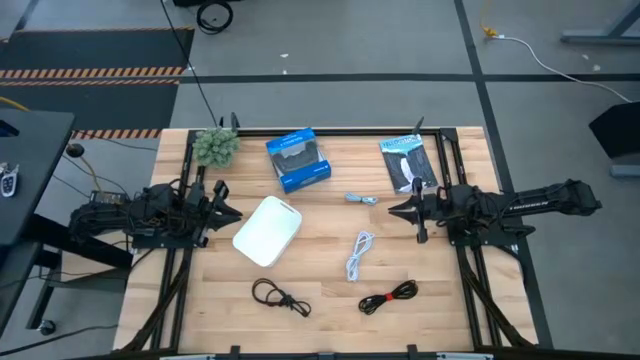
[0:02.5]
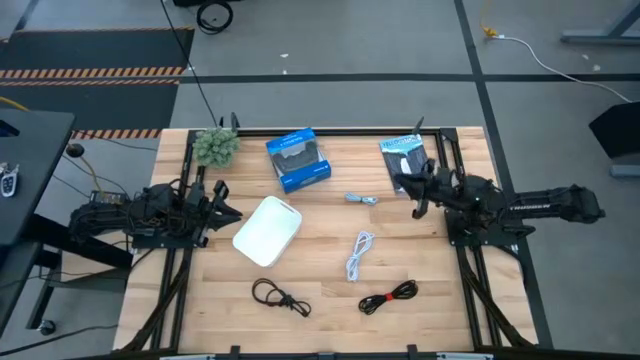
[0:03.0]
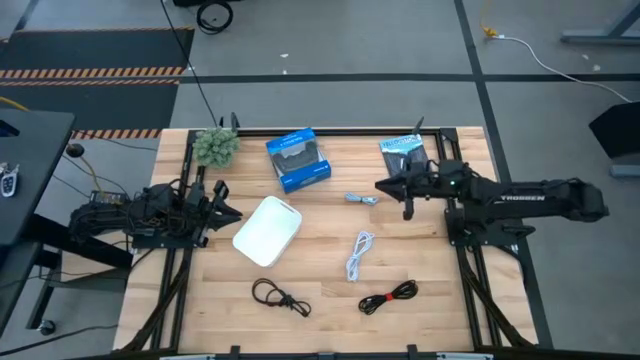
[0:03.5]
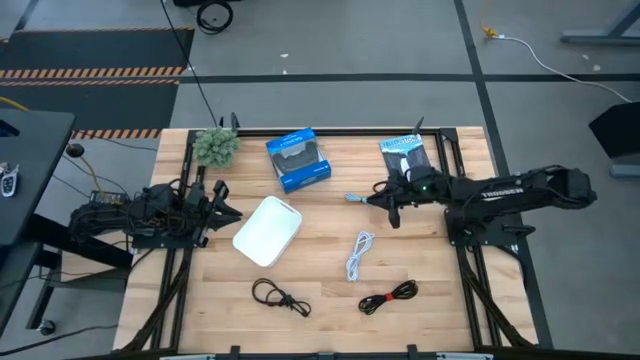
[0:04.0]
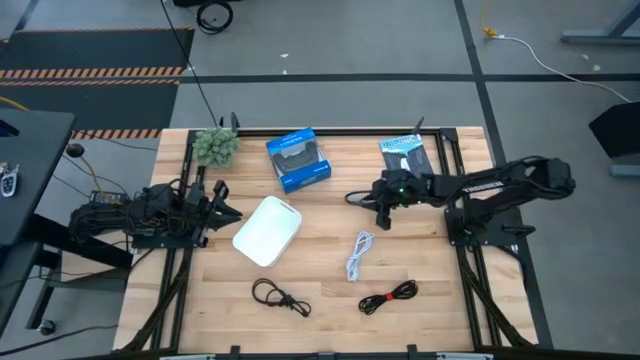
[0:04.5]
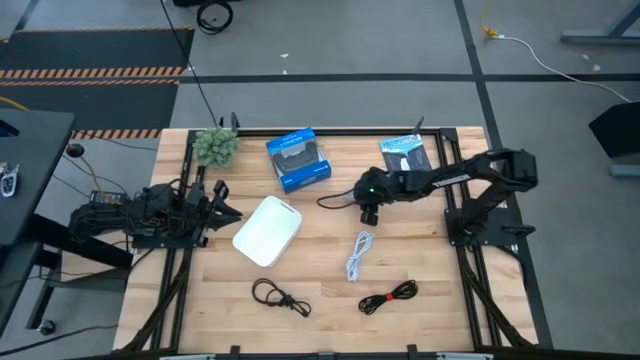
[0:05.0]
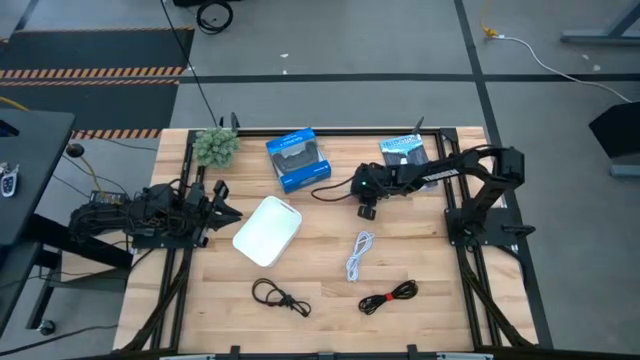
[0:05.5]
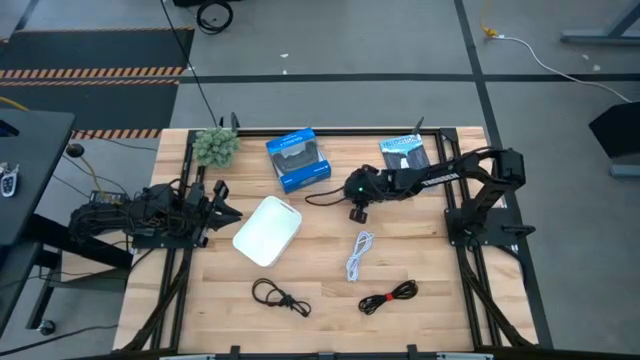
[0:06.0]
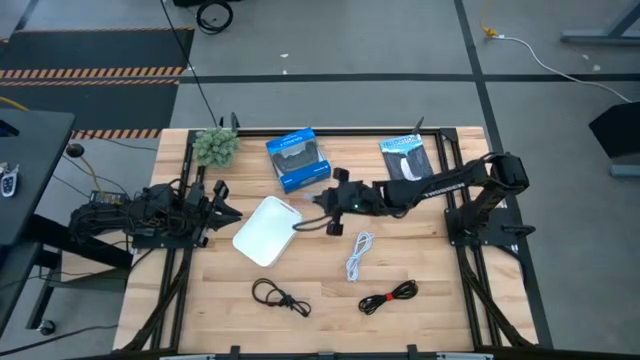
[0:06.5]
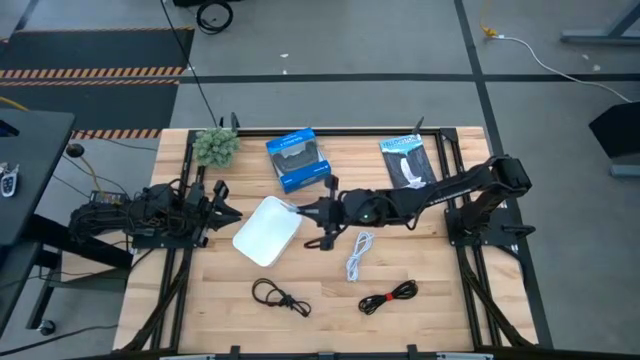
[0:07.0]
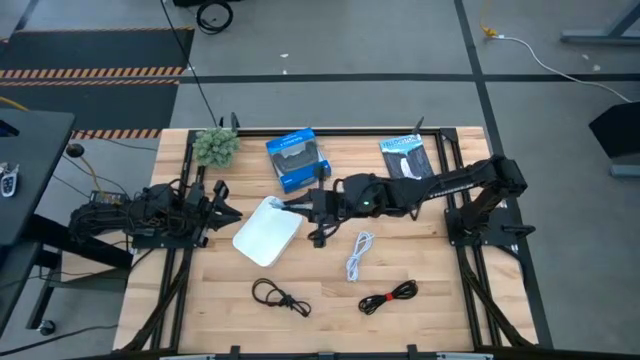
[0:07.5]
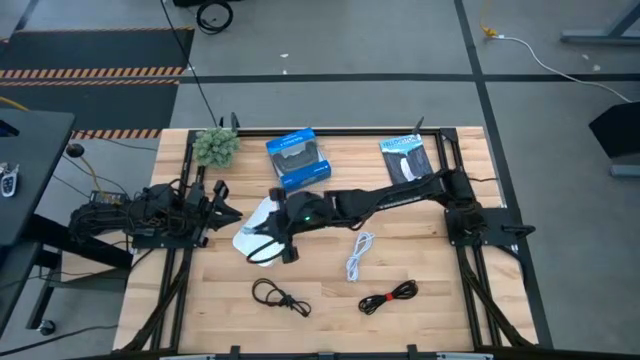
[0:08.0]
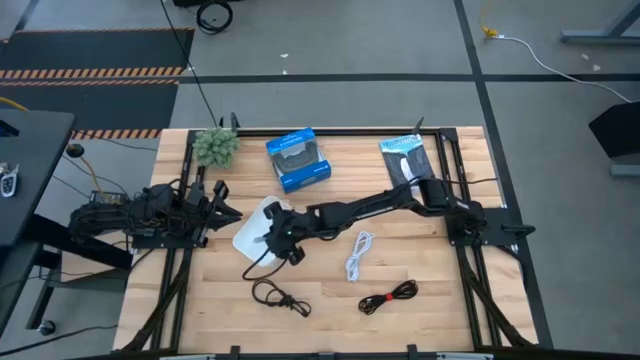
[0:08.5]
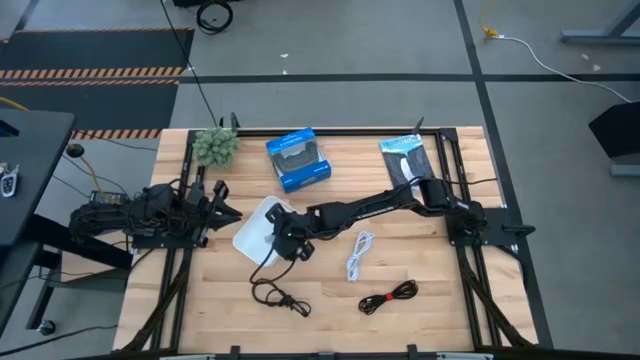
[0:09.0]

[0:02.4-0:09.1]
Task: Pick and place USB-C Cables
Put the light blue charger cable into the white bin

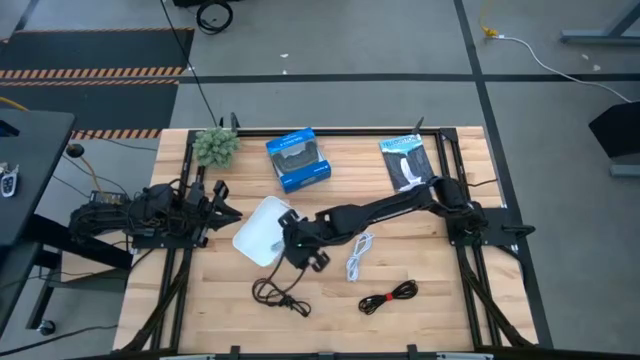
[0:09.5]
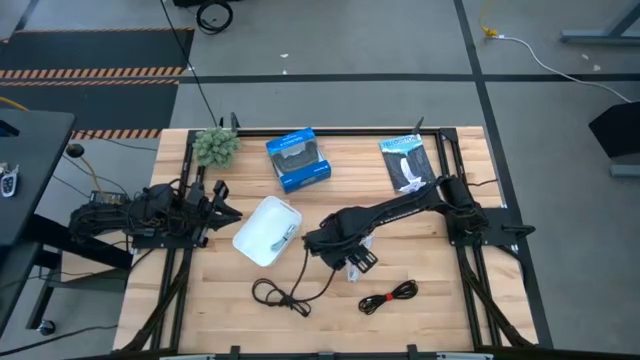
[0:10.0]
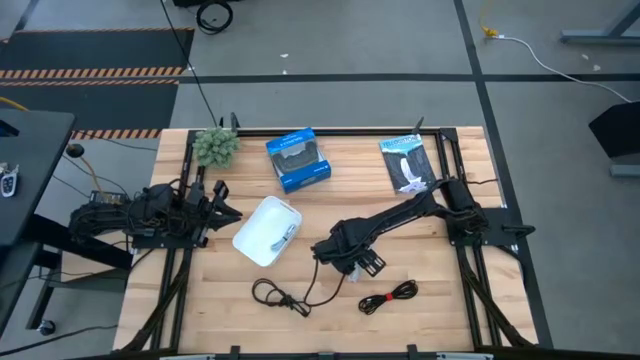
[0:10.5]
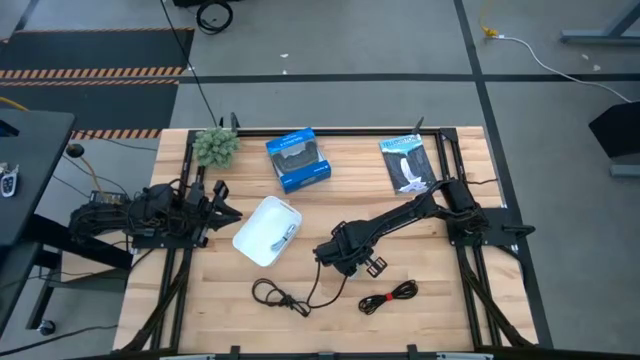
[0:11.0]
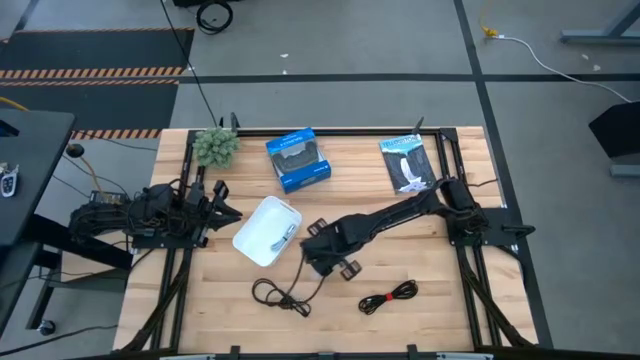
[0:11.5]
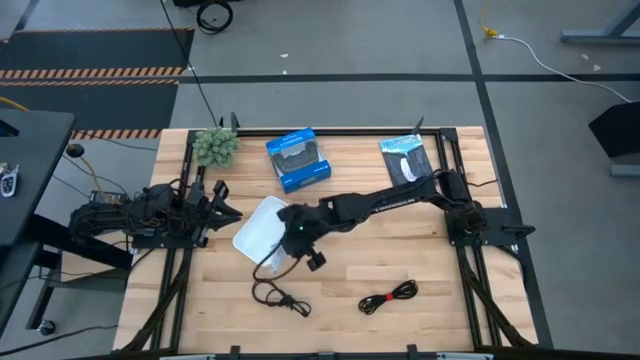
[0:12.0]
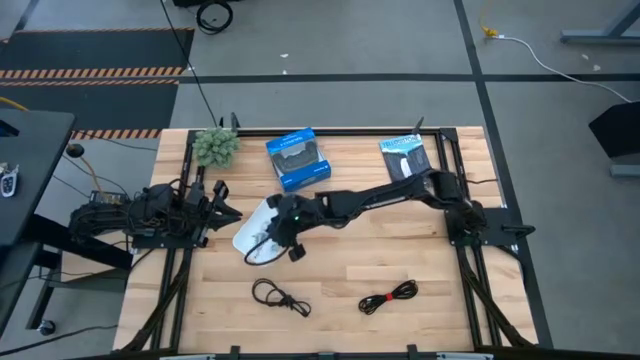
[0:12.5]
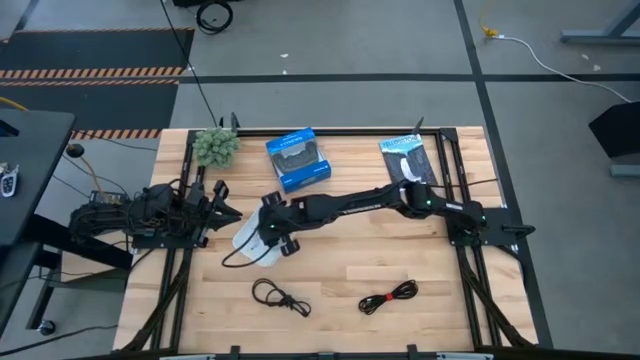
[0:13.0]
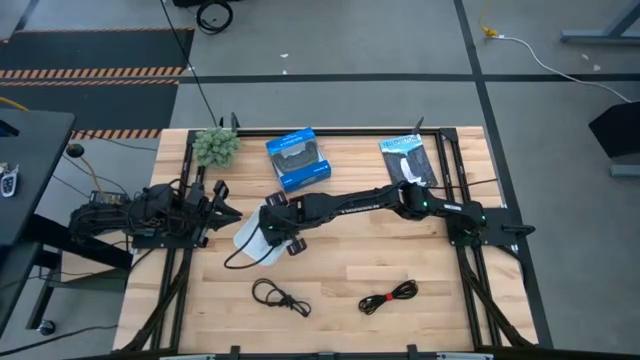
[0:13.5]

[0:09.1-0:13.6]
Put the white charger cable into the white bin

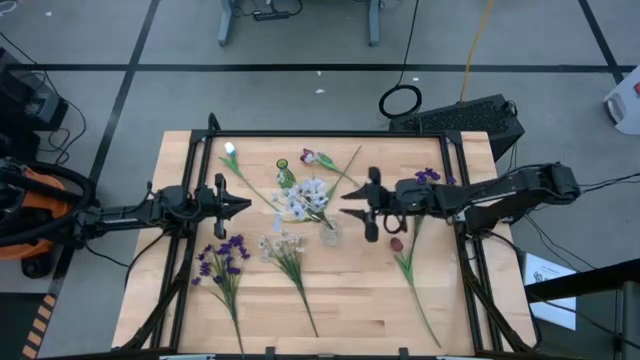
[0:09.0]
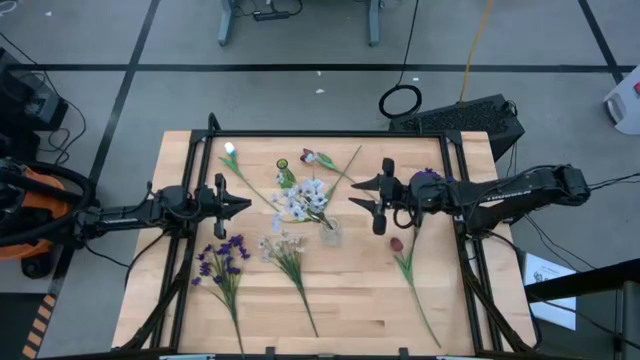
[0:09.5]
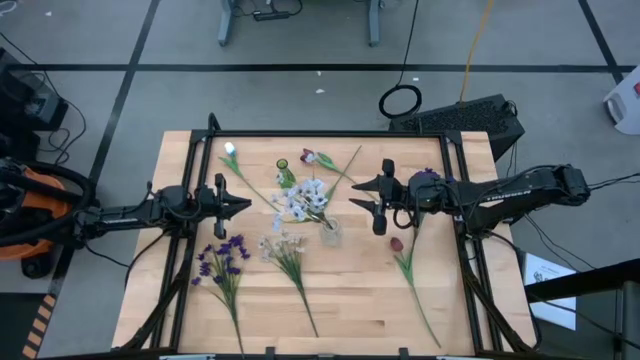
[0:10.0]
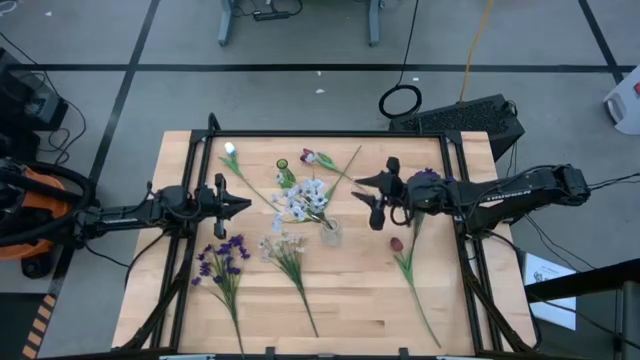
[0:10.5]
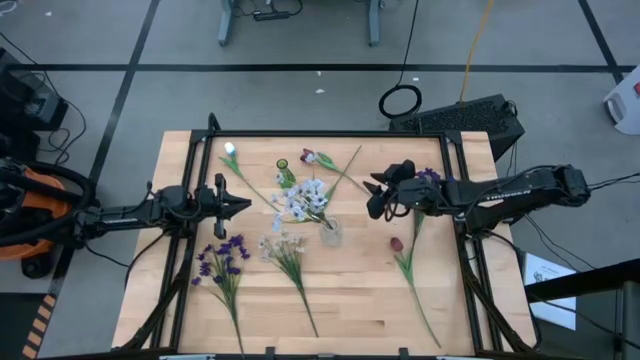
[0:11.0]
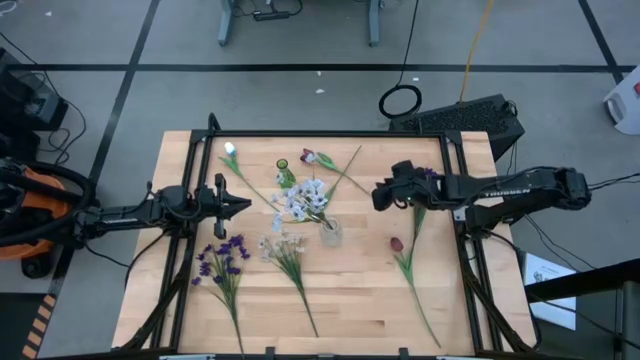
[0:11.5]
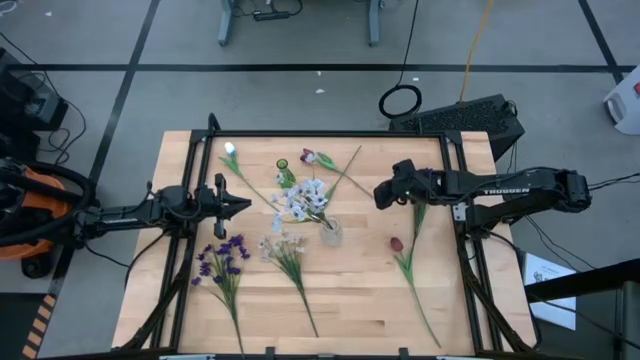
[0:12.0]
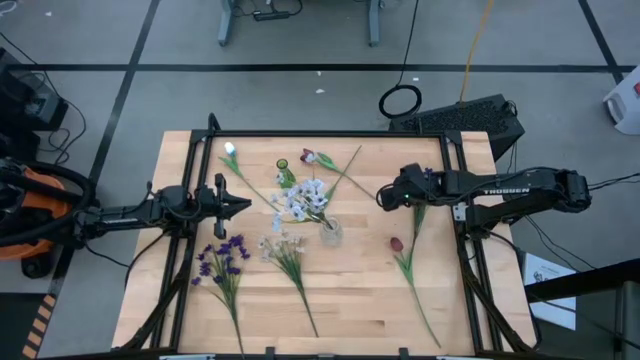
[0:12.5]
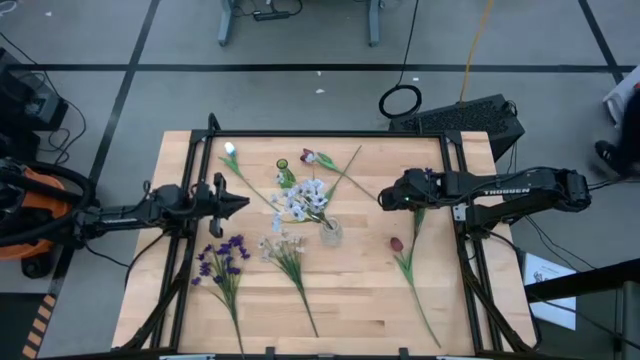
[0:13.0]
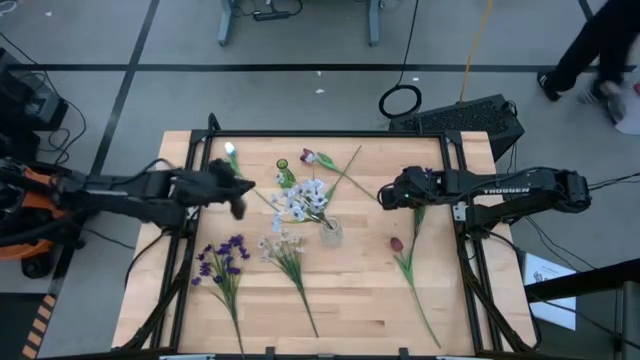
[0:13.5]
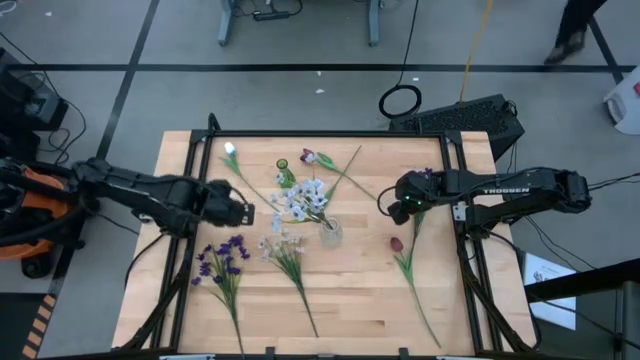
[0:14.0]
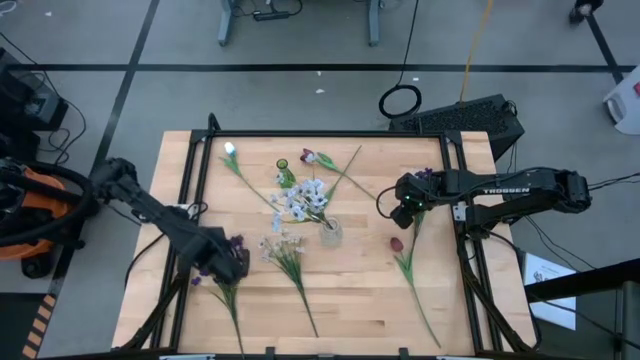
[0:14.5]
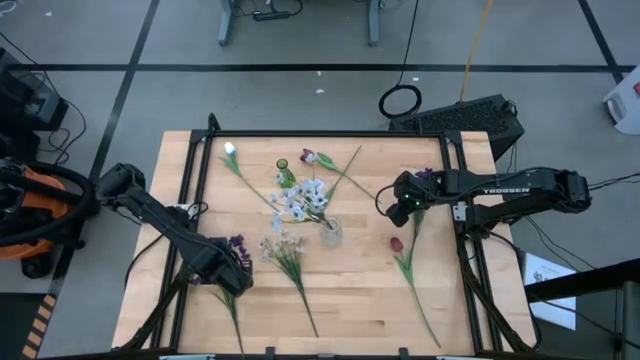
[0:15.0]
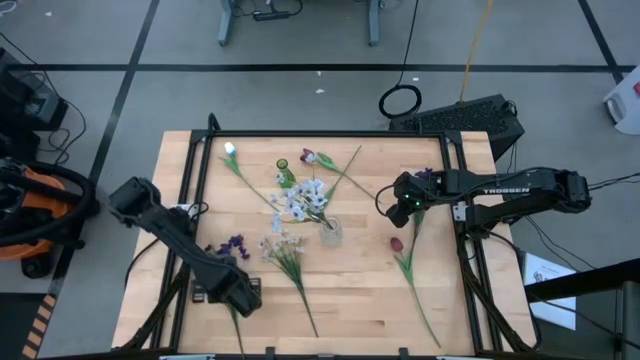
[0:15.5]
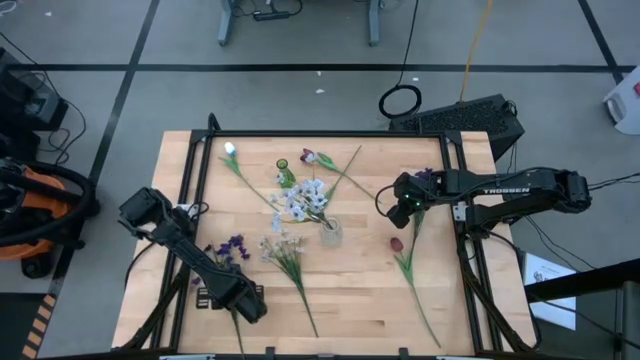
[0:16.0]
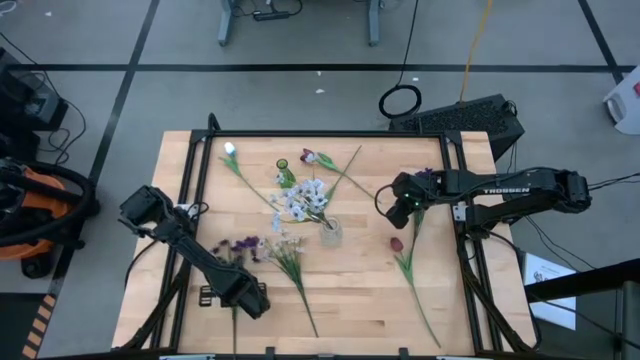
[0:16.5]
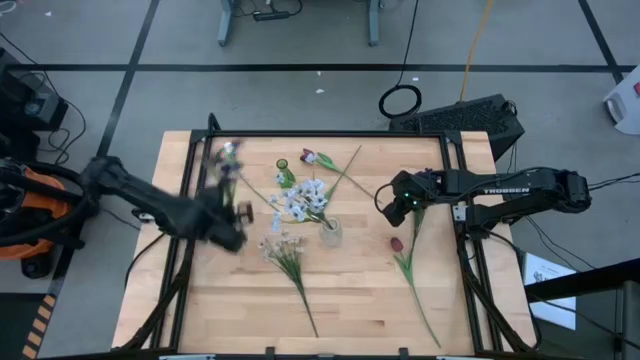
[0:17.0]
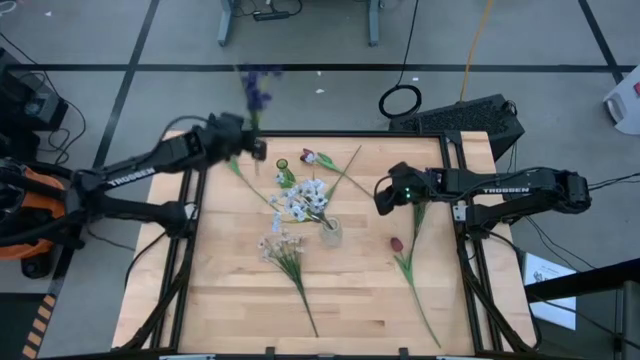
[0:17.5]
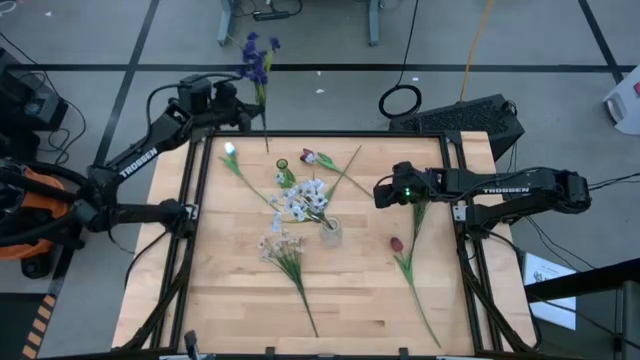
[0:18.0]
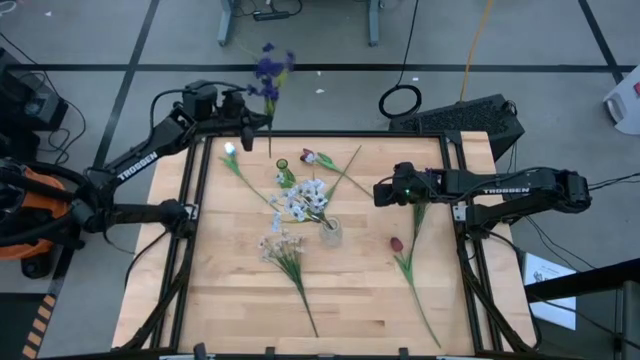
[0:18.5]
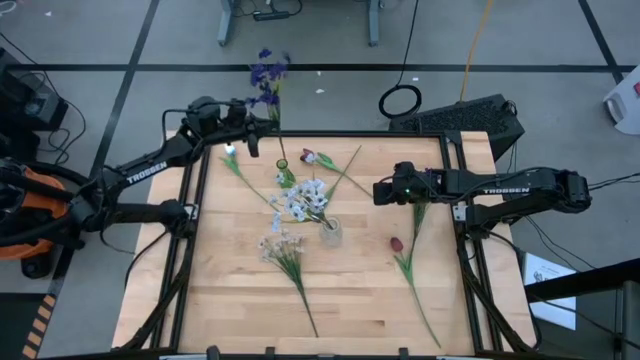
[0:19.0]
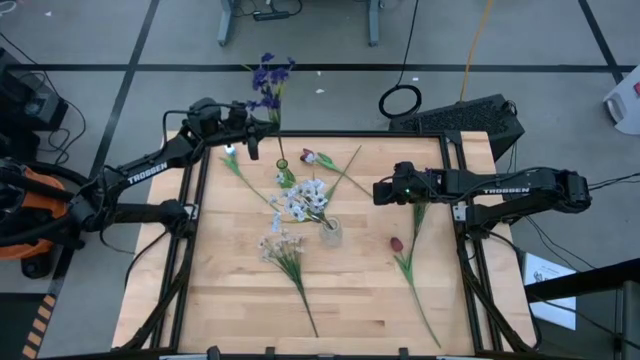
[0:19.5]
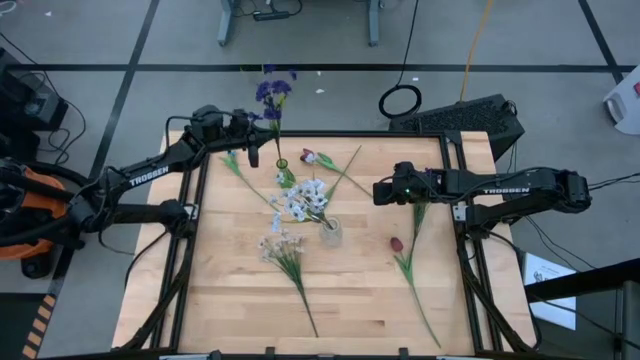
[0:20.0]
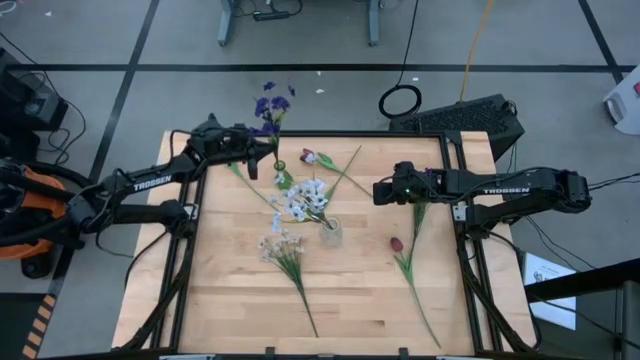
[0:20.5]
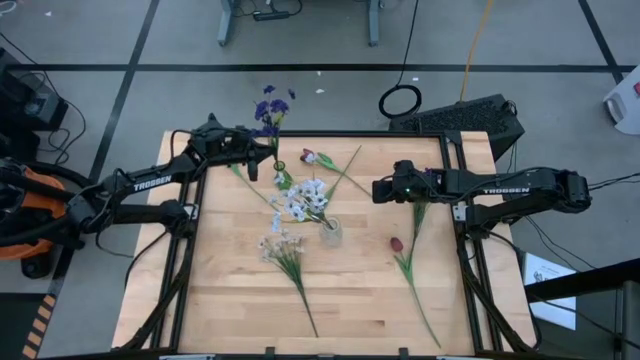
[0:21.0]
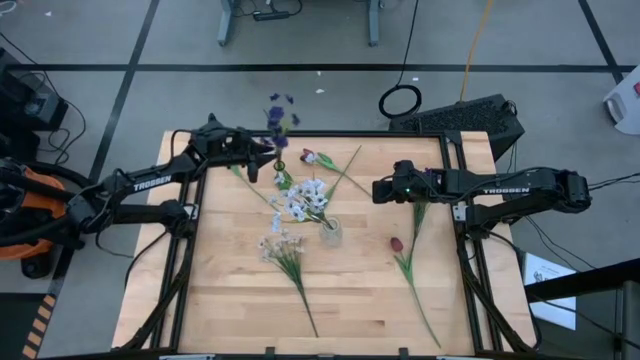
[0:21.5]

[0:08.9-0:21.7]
Task: Sort flowers into vase by color
Put the bottom violet flowers into the green vase
